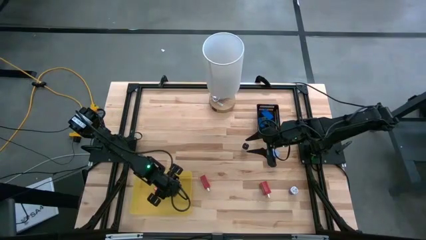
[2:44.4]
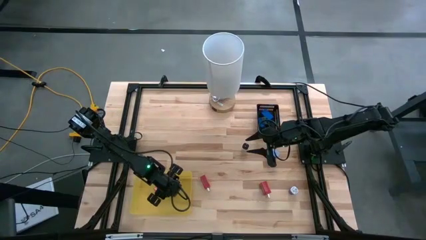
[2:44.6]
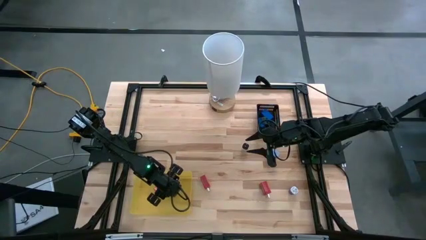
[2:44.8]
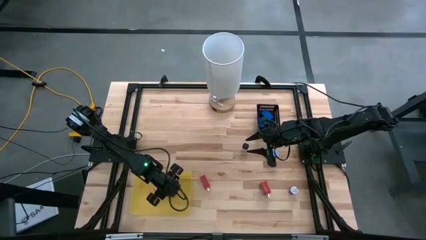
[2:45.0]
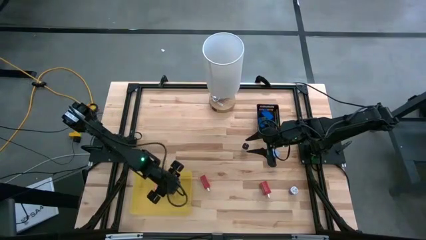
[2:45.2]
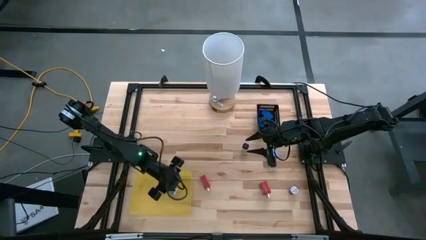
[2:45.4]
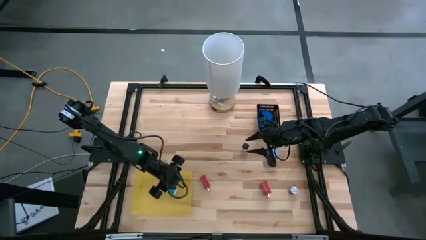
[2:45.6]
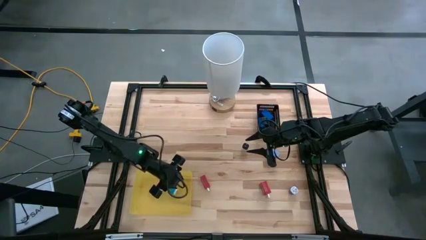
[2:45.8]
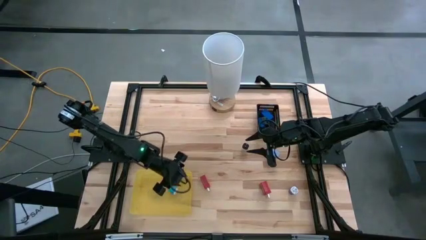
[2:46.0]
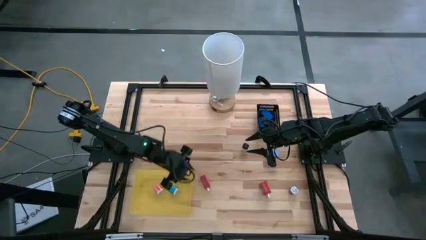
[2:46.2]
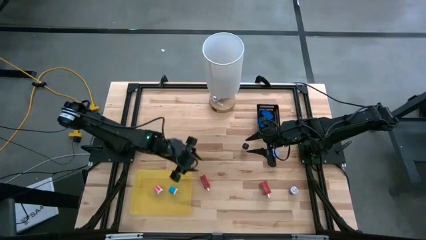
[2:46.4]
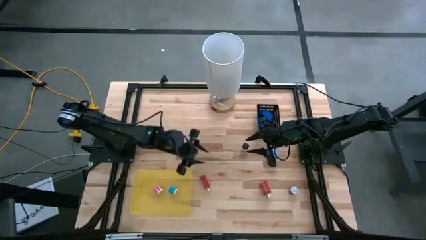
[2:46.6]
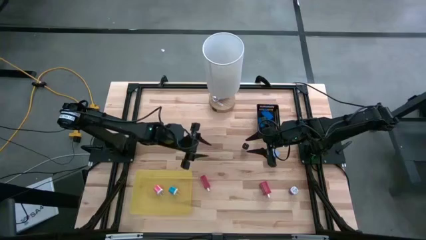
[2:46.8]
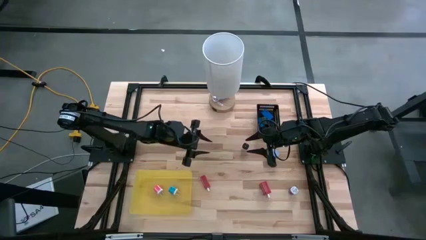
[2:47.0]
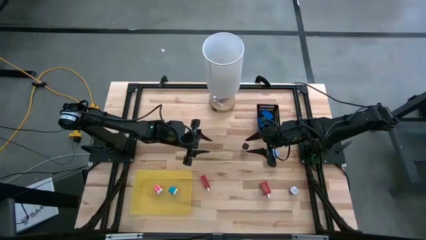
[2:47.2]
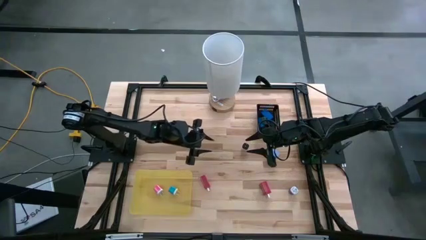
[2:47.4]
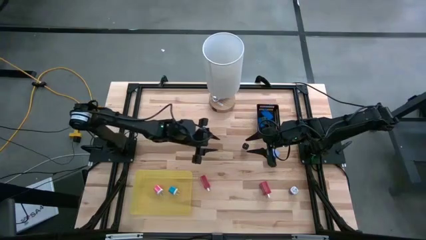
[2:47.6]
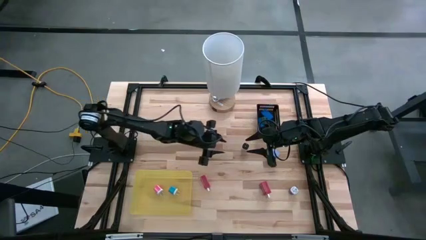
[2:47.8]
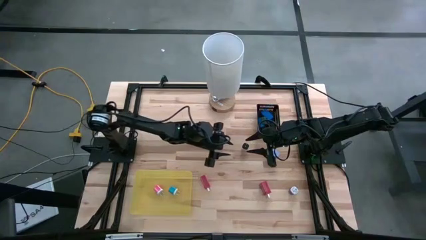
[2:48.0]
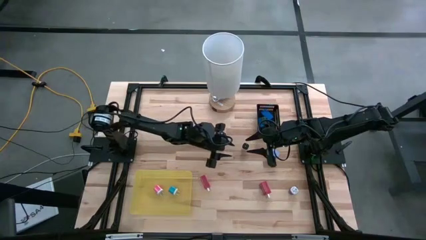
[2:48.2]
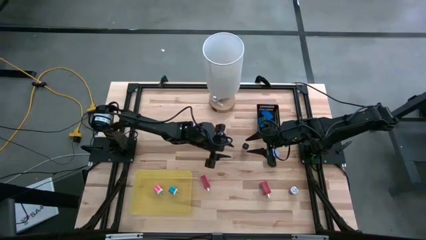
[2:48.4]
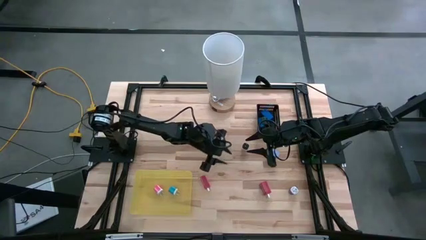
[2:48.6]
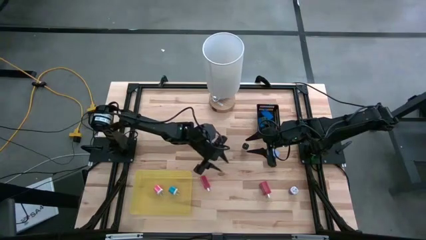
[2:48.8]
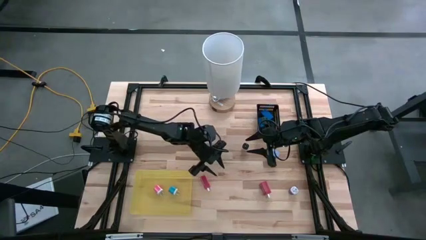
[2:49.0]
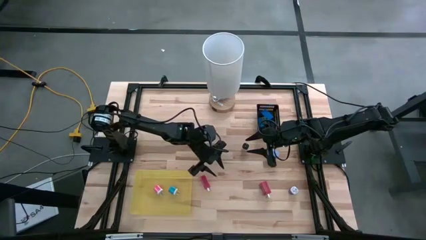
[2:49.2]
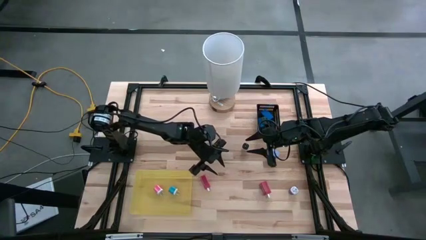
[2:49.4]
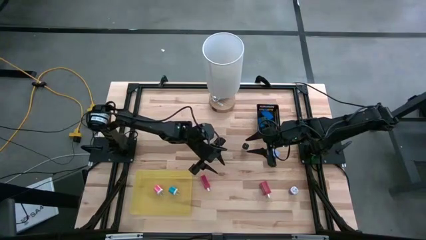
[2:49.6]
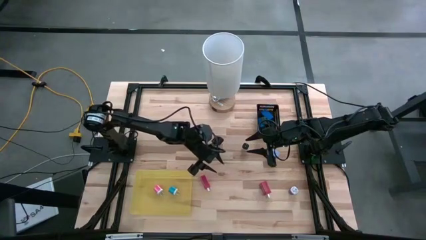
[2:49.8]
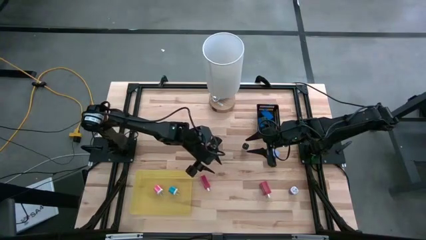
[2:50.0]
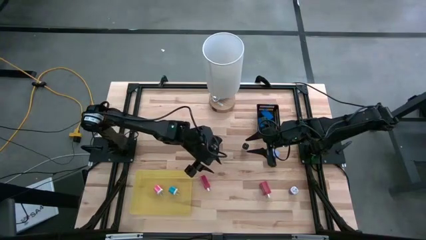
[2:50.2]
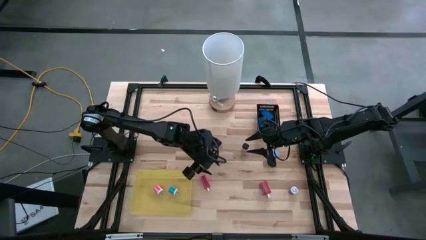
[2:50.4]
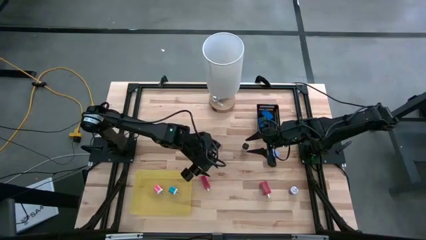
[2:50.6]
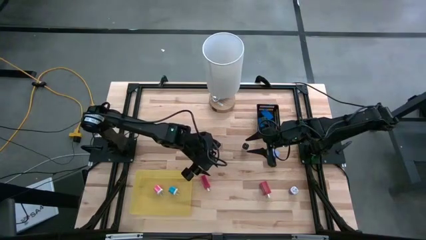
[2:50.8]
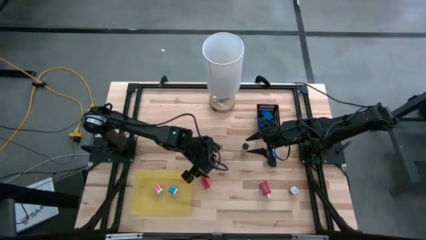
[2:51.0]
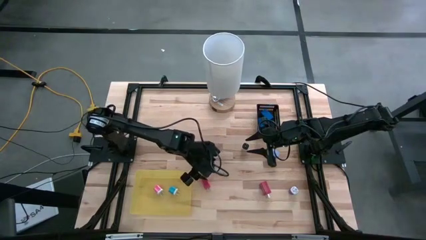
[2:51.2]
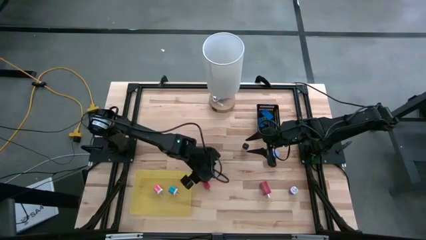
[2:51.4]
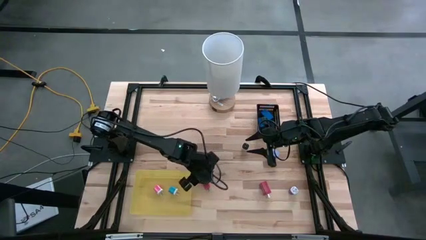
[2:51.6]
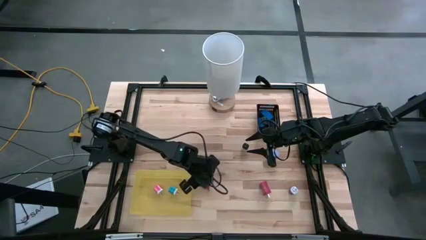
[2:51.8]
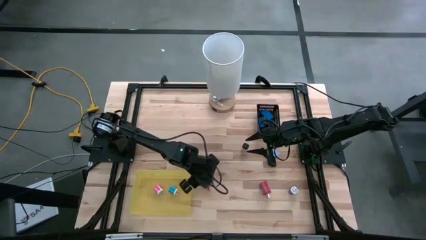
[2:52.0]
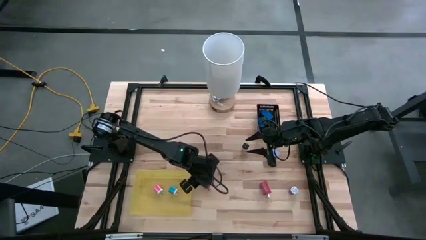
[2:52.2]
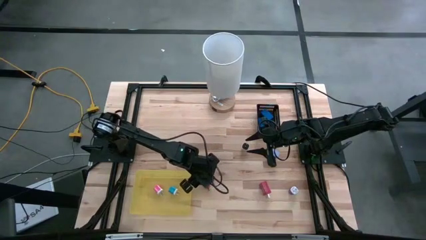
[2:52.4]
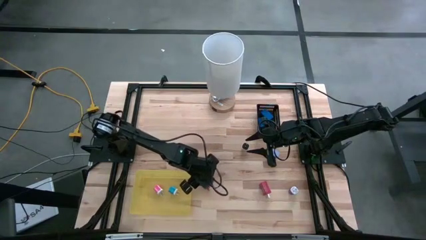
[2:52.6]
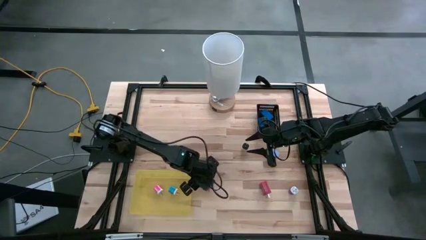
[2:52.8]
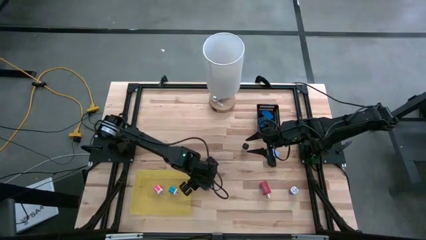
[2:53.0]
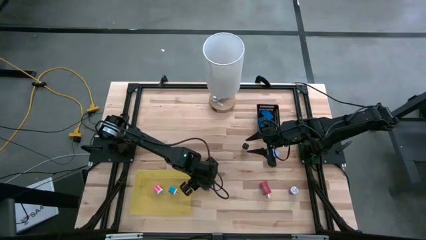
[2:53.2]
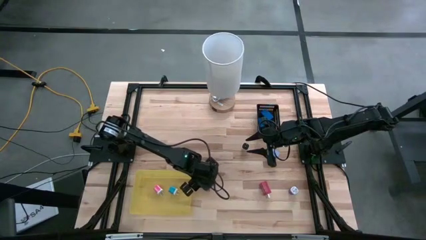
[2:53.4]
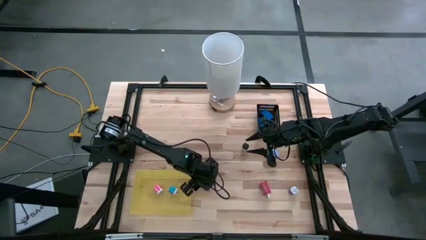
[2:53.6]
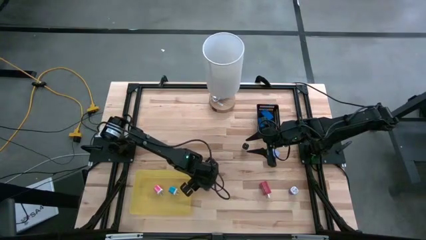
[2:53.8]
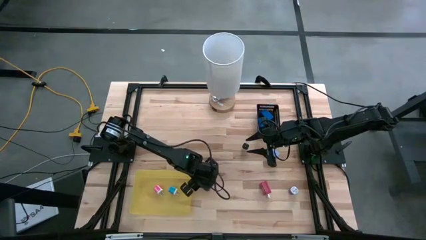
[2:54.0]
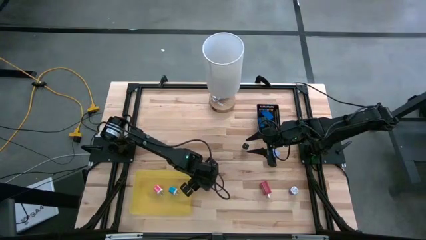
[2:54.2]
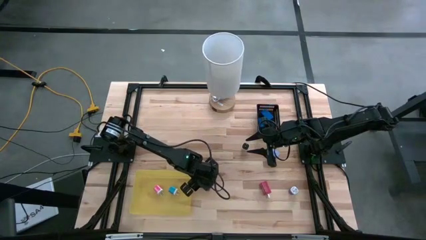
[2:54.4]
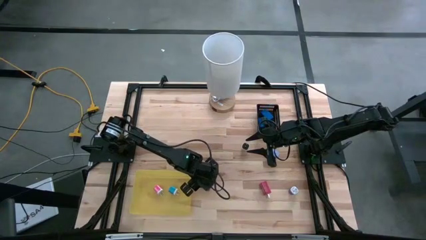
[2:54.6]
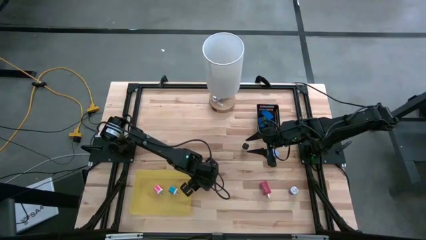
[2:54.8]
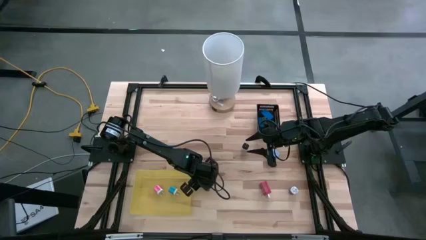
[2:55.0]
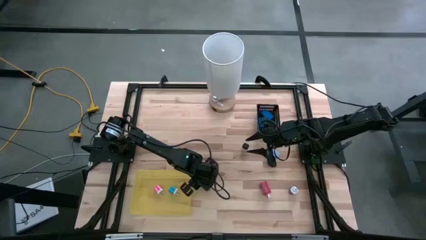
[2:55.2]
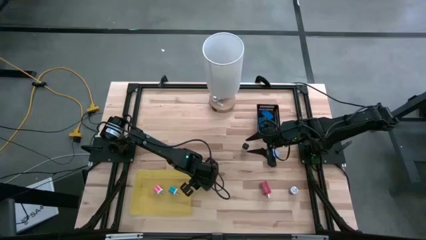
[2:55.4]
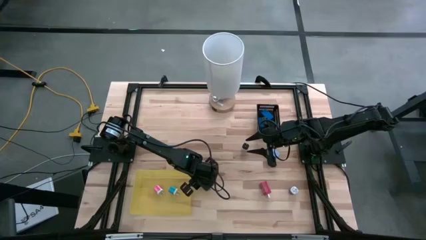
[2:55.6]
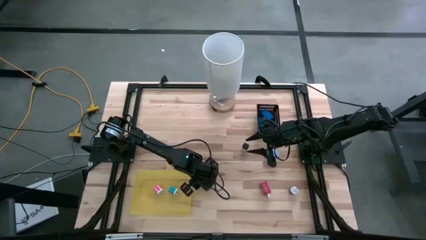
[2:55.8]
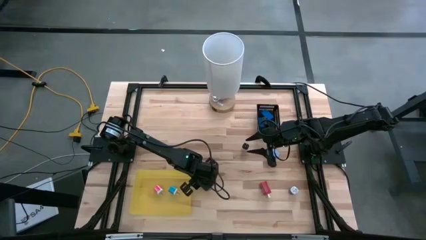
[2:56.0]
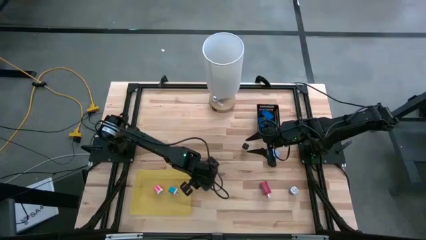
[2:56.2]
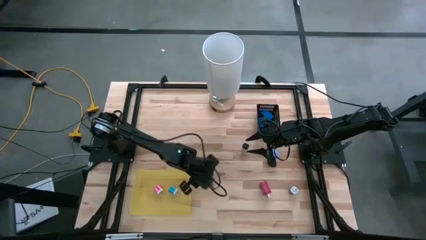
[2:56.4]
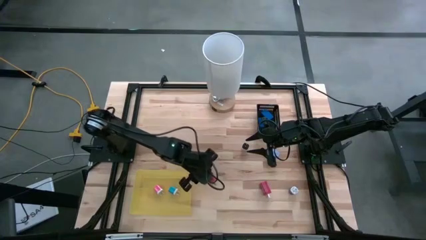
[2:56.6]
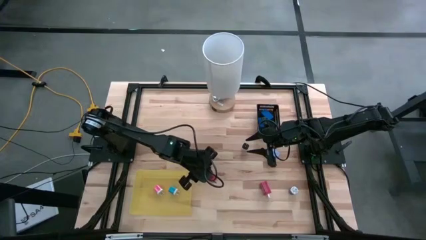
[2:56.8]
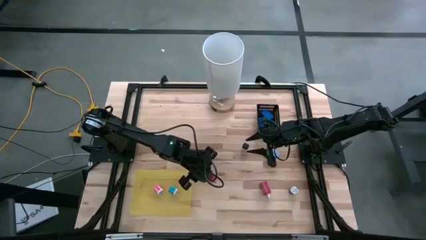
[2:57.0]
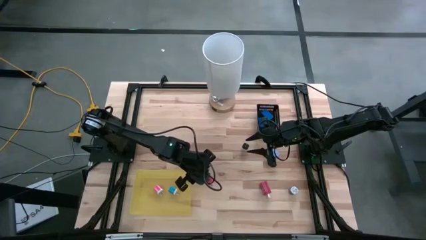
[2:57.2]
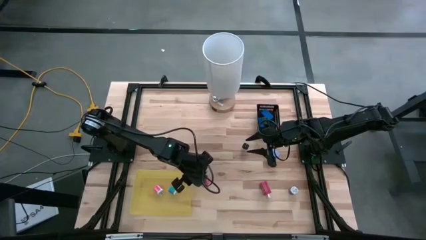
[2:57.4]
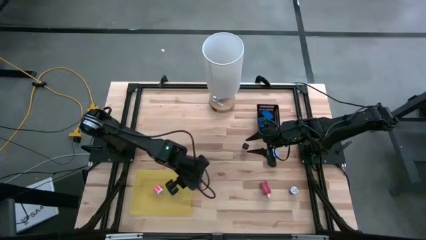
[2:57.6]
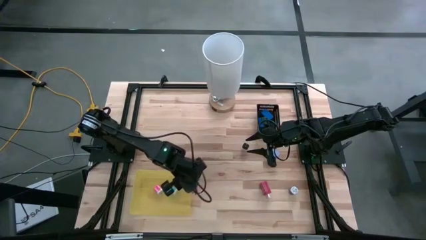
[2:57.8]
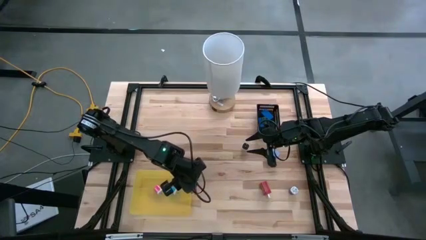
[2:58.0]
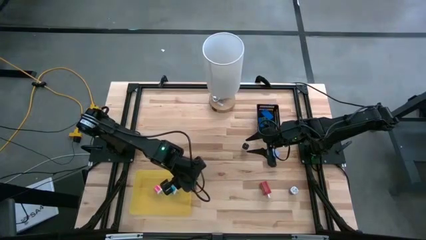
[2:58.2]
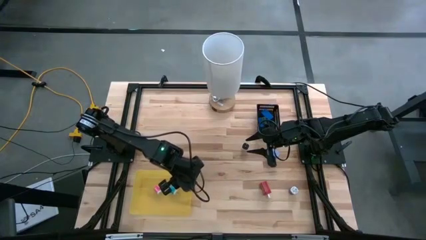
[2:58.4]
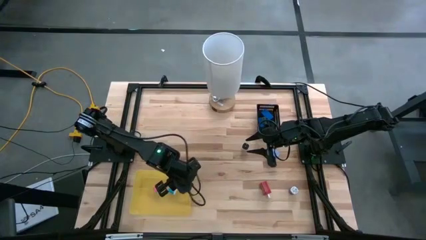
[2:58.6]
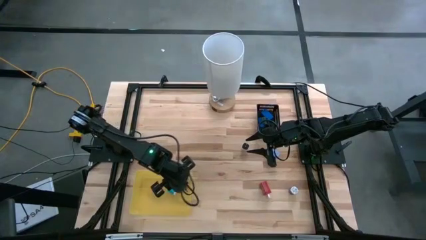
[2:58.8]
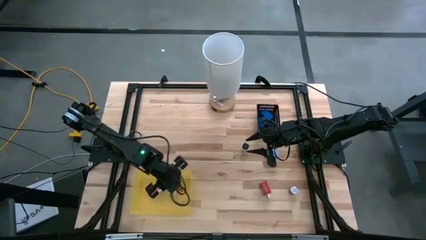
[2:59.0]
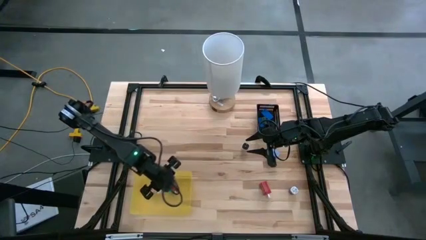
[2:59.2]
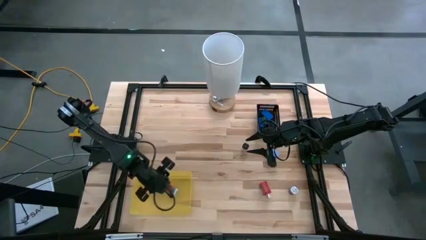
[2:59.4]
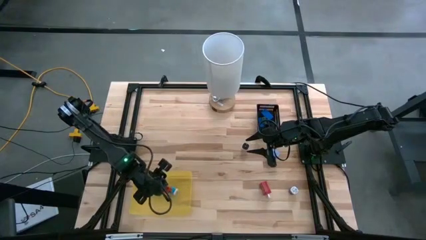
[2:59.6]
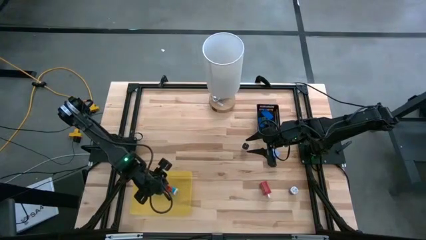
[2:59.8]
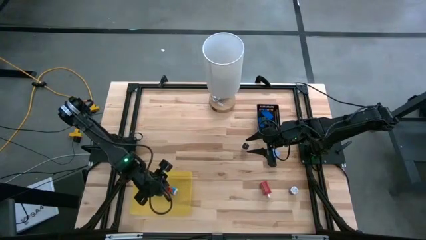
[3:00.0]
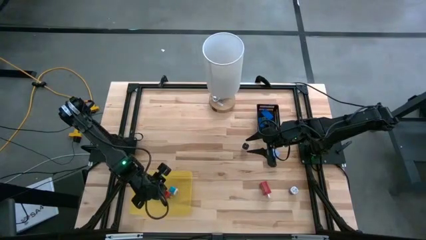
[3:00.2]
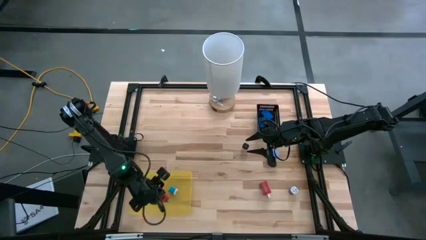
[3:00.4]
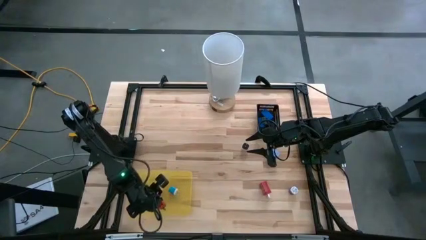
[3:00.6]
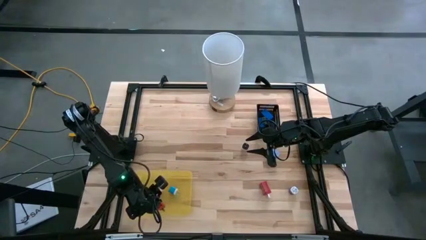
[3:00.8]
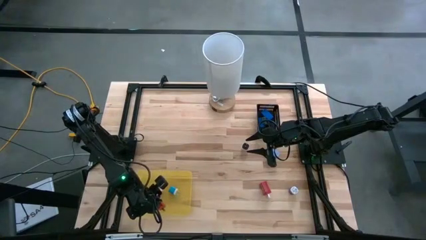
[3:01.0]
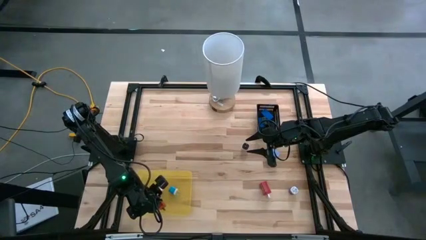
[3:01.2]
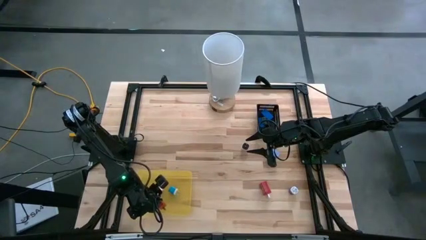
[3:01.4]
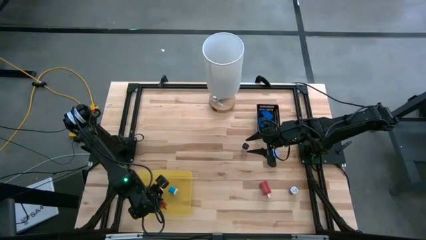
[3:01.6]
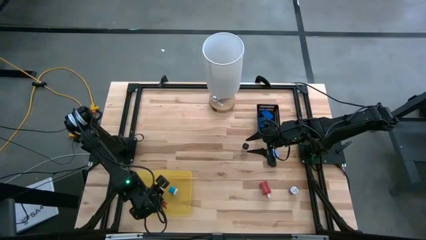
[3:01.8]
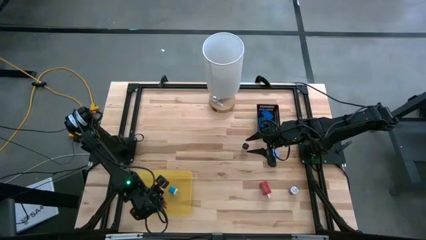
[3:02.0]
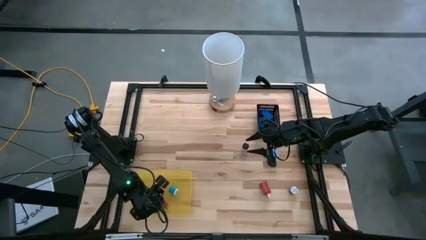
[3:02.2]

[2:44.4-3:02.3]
Task: Pick & Place Office items
Put the left red charger adapter into the yellow bin
